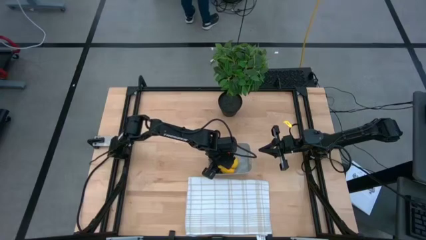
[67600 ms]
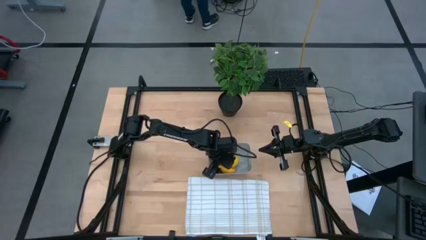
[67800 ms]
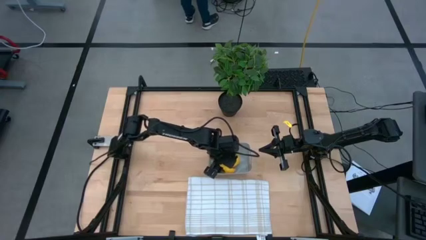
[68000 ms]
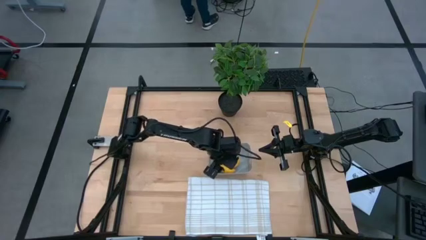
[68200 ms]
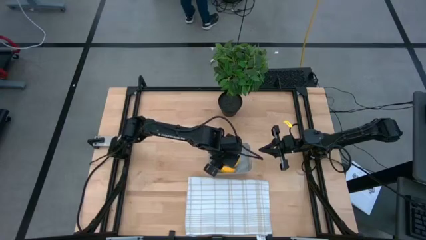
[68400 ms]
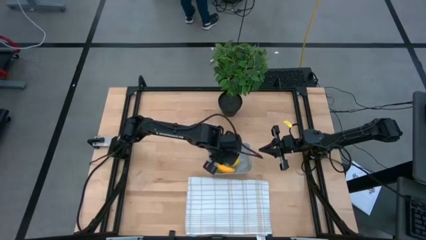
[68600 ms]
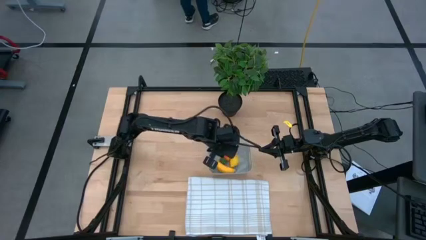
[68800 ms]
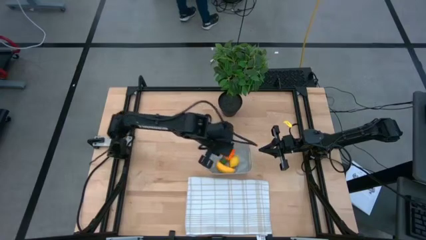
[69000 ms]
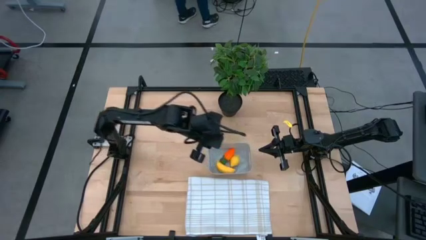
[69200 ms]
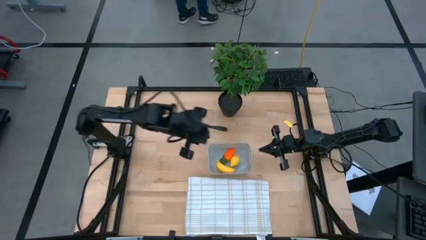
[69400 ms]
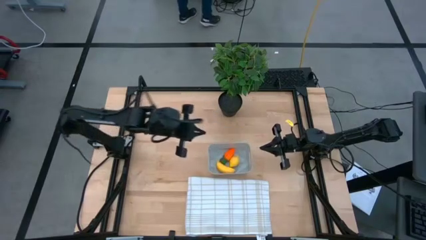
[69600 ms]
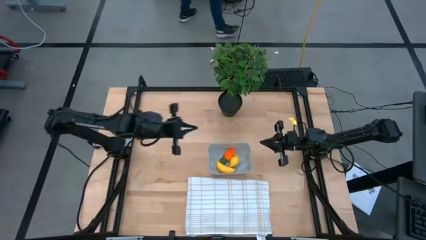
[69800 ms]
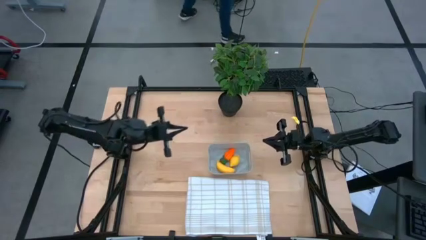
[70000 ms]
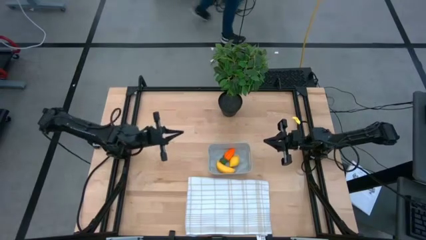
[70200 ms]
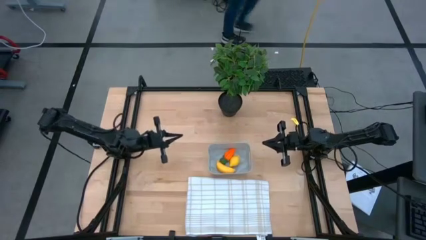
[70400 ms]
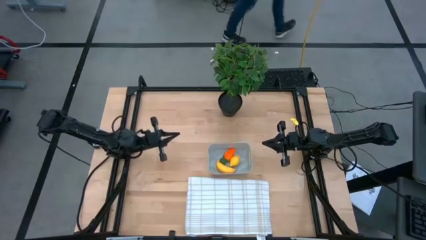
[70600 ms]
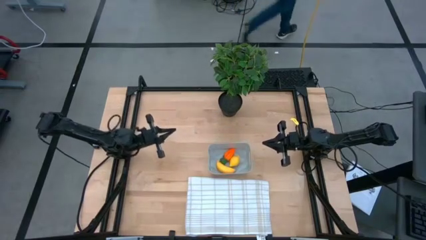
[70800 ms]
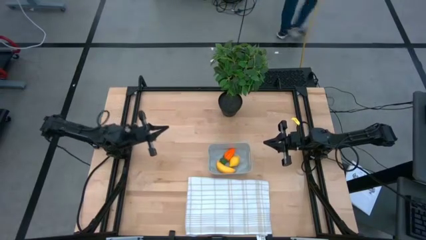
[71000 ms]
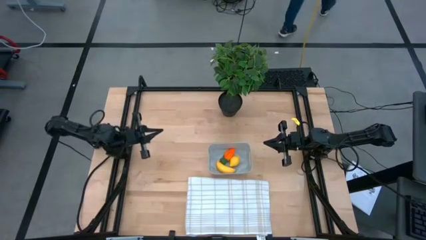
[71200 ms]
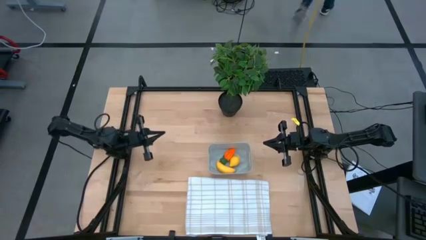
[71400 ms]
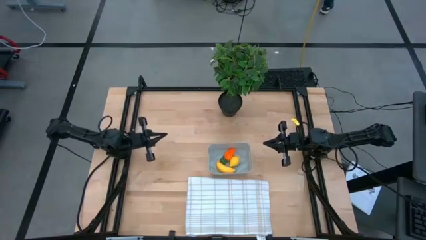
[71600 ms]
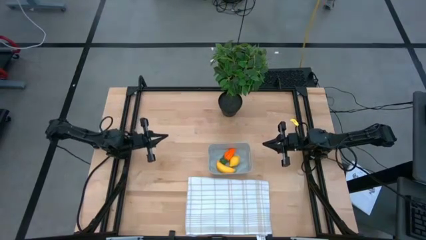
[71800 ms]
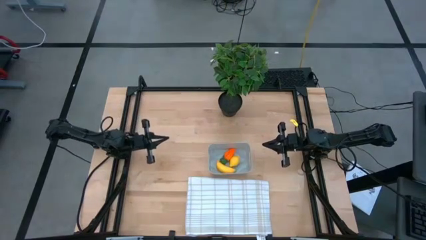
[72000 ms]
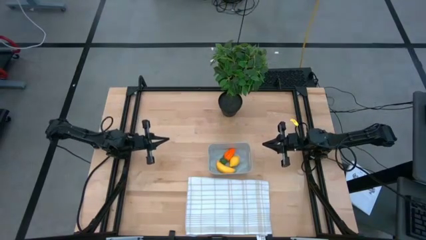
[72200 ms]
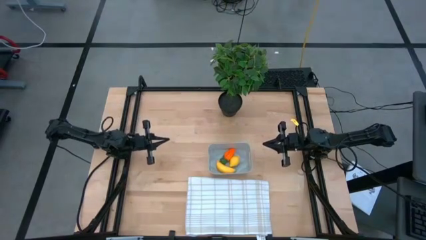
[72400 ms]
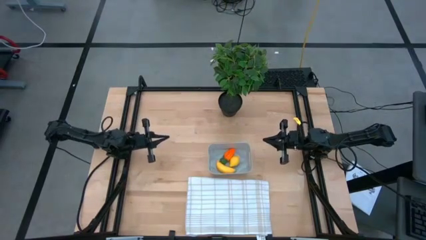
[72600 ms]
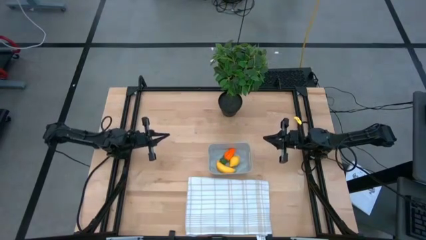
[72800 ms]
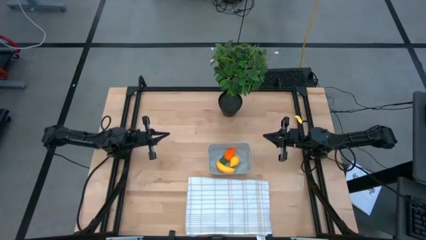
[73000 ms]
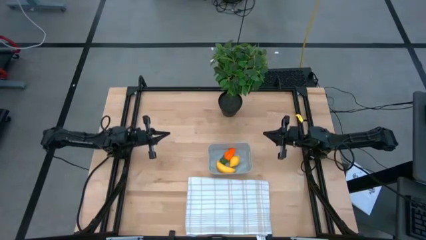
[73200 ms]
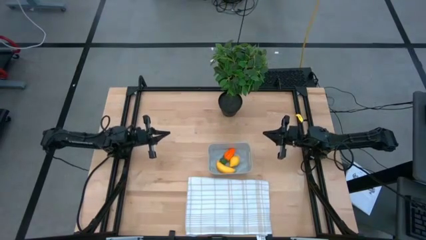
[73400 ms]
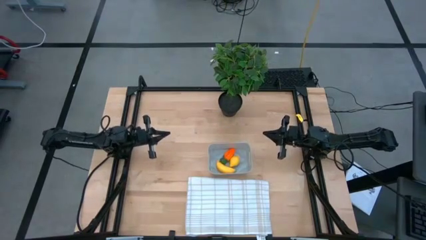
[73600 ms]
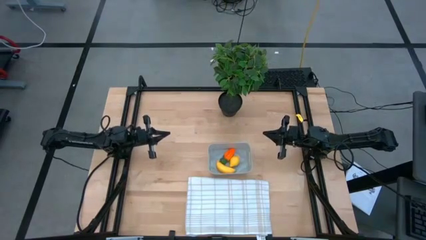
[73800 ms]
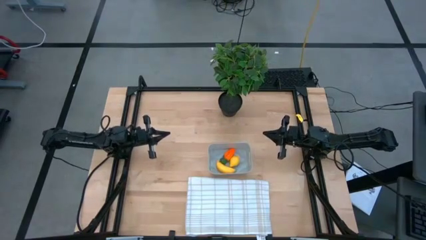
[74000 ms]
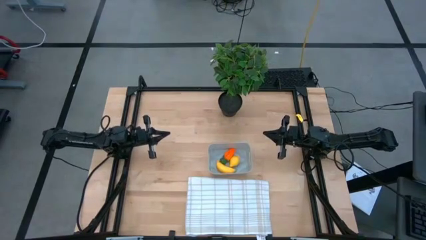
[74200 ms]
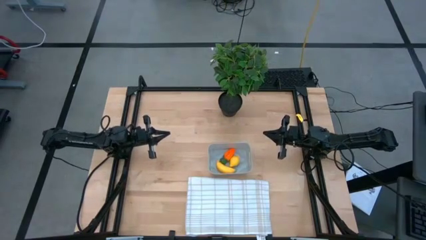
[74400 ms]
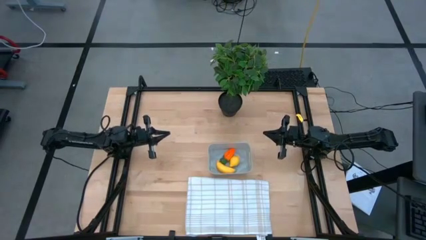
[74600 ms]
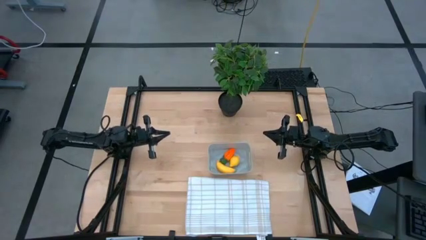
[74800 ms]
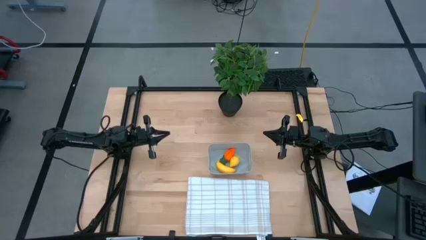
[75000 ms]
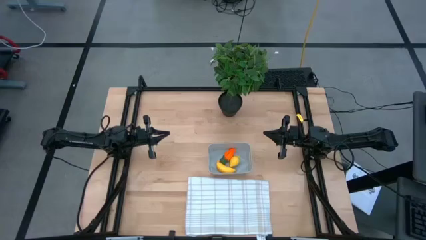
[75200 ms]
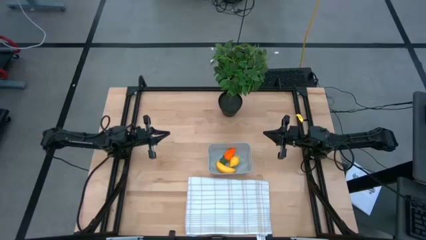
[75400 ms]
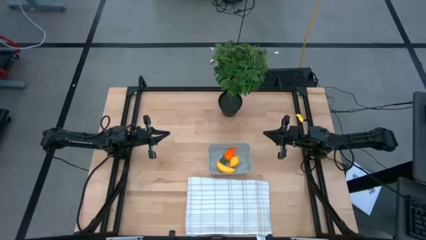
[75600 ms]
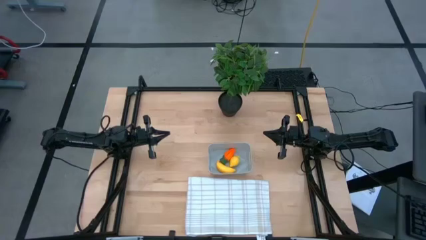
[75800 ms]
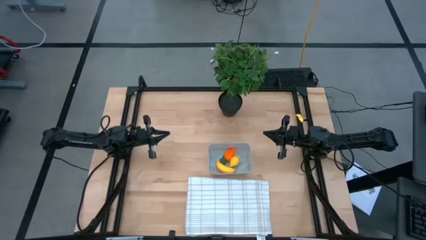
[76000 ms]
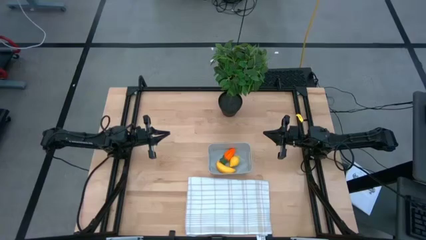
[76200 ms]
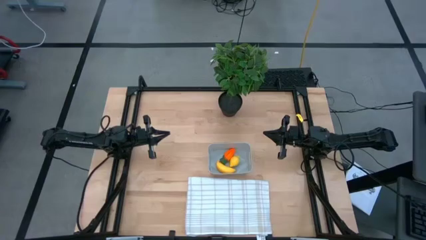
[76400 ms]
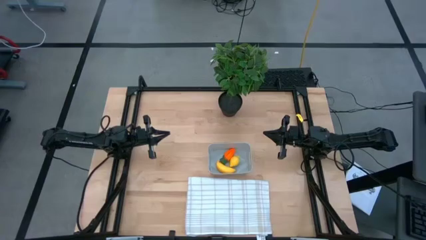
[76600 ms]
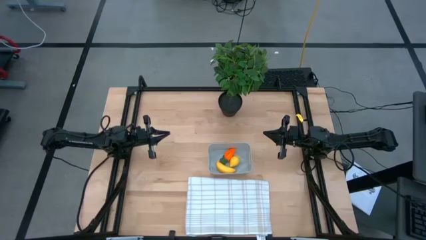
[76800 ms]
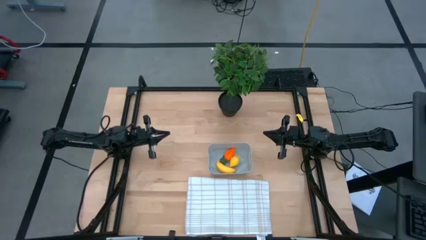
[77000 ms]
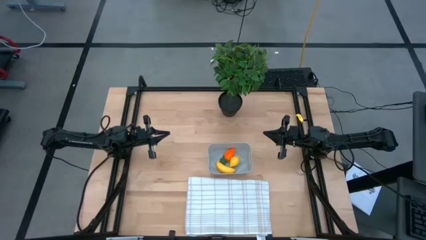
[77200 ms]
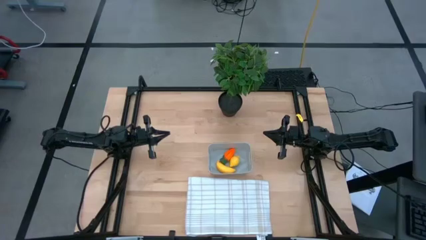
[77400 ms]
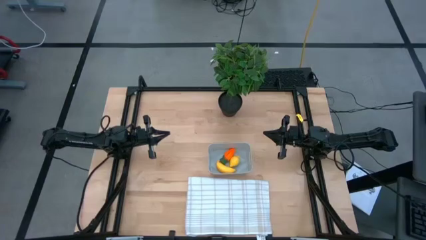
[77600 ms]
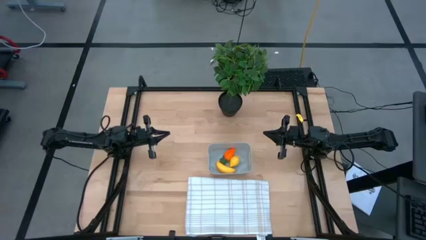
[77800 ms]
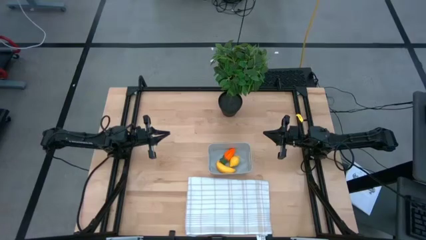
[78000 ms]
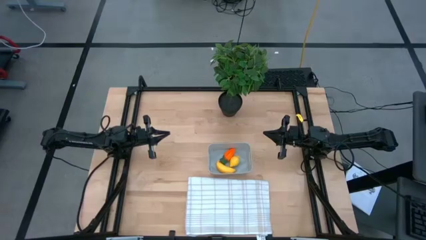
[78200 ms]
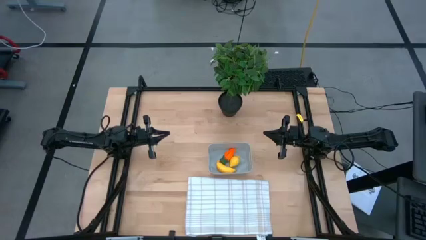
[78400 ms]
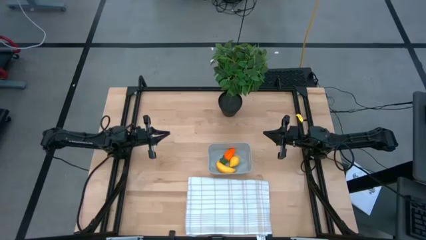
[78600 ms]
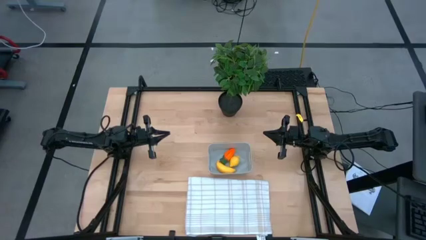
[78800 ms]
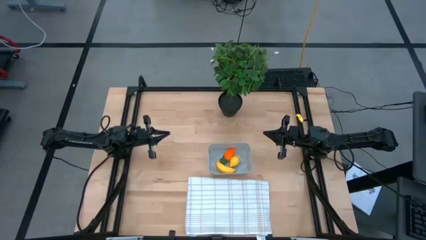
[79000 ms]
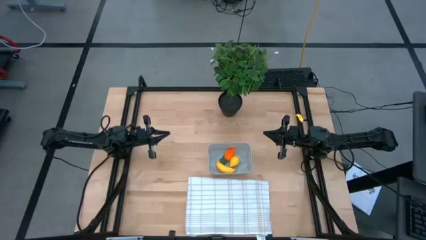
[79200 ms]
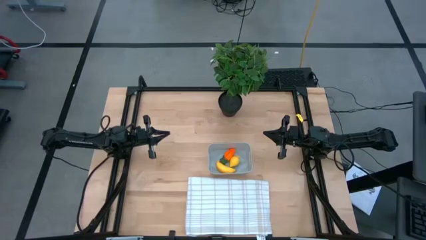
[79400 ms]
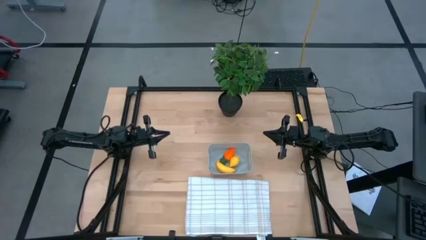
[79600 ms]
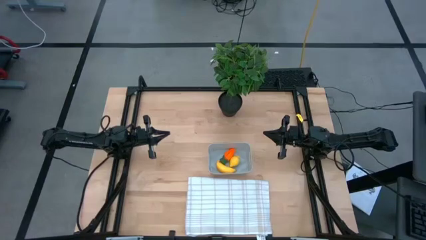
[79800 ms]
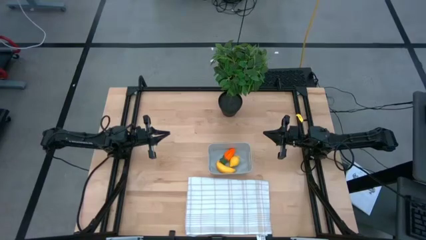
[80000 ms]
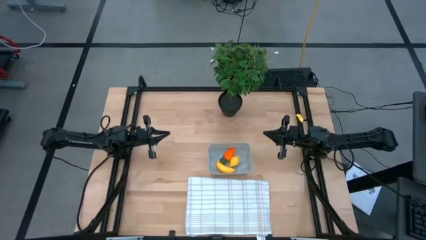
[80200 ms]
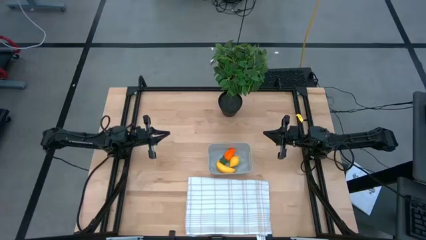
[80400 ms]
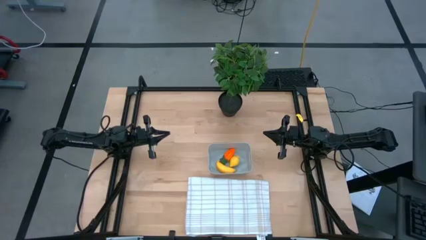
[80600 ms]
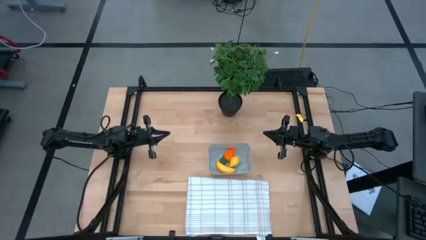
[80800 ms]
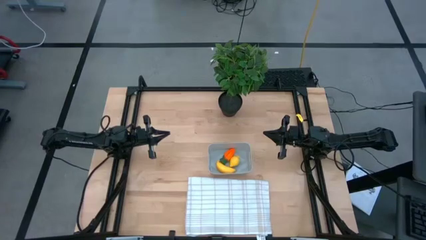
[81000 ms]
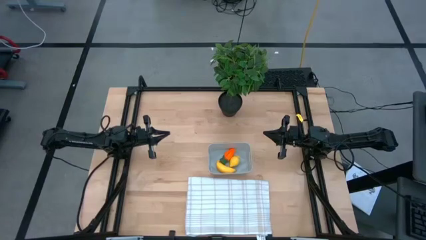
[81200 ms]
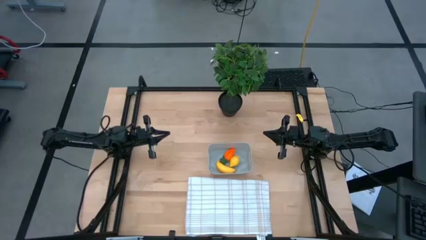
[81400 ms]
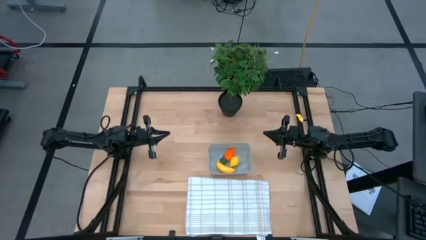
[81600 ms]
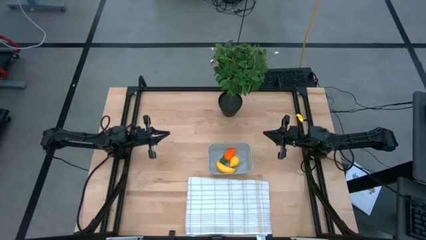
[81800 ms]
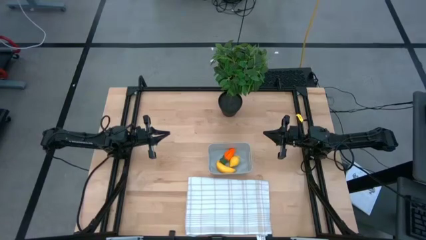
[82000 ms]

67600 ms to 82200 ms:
Task: Pick and placing Produce into tupperware
Return to Home Position
